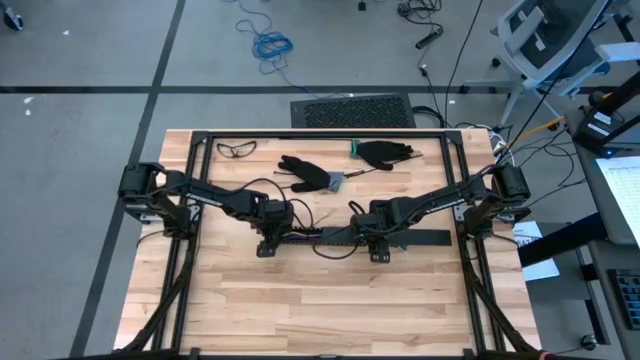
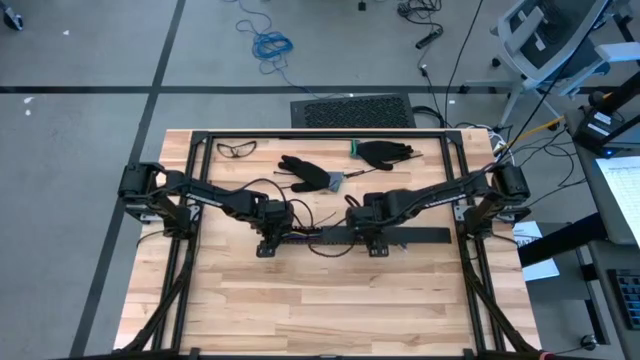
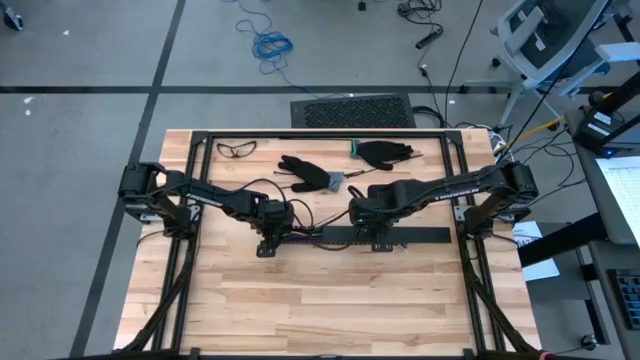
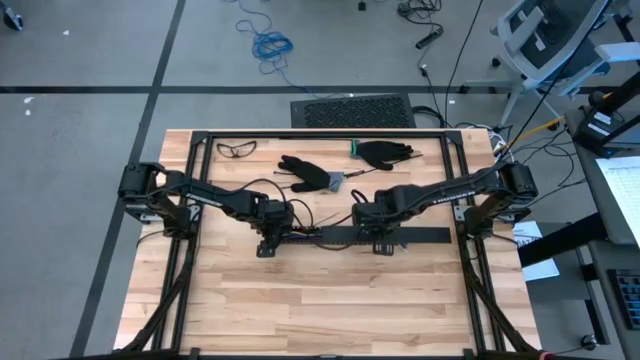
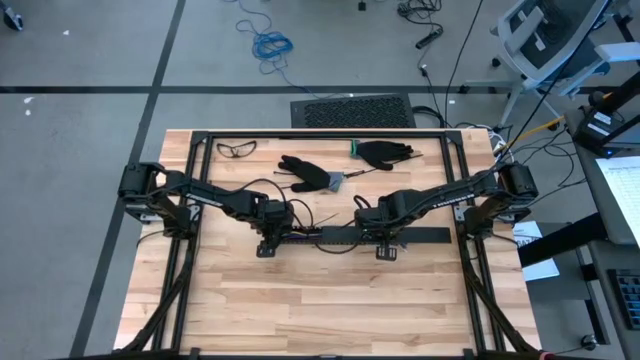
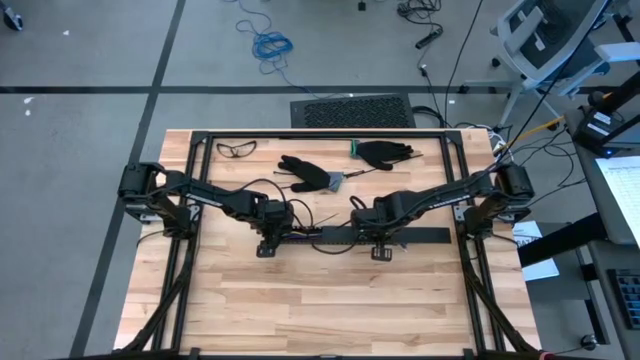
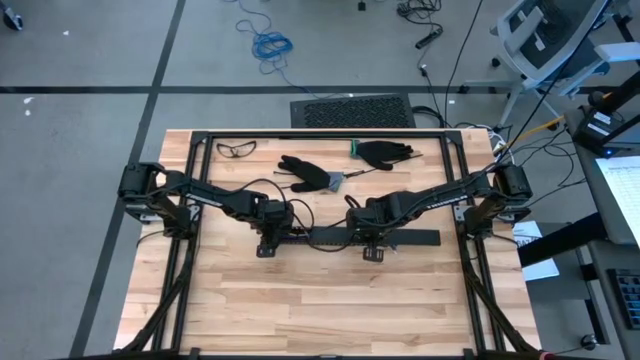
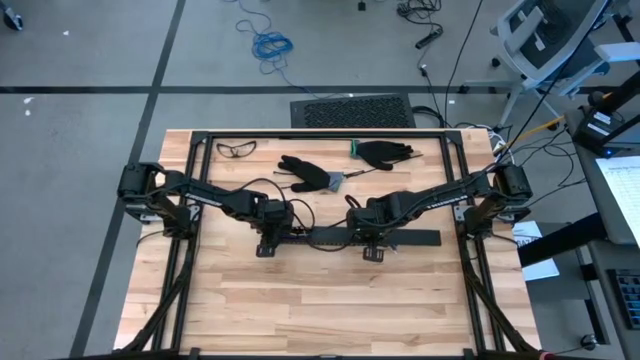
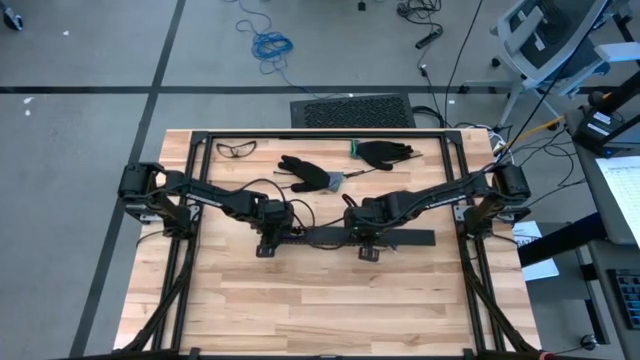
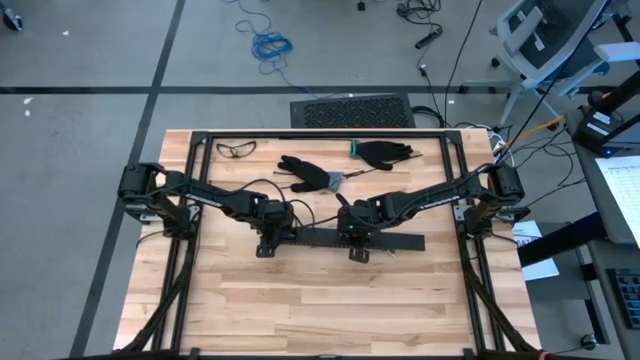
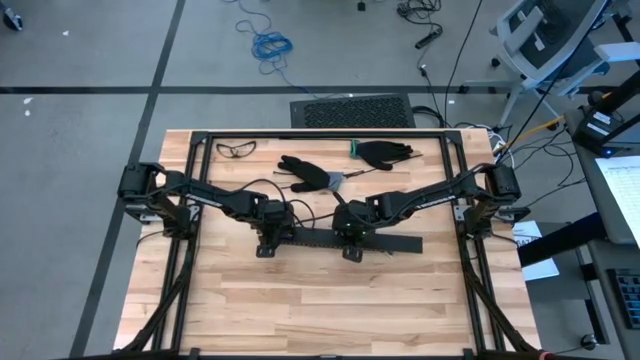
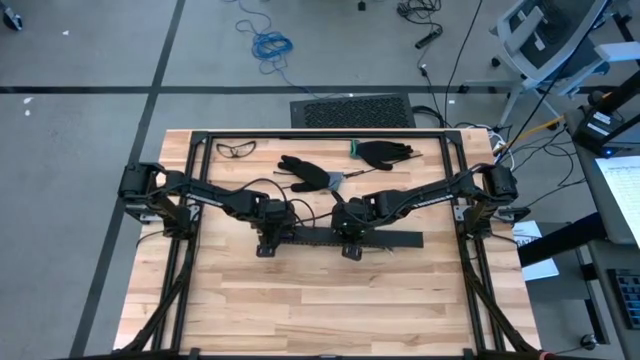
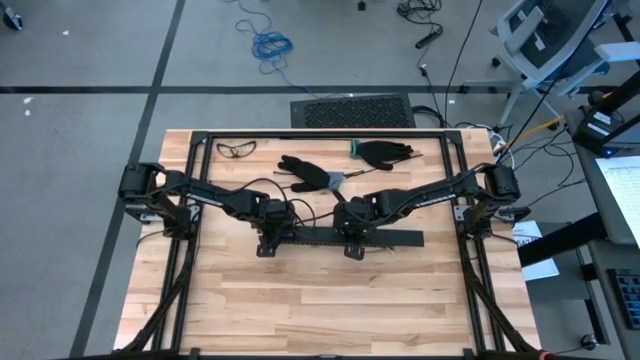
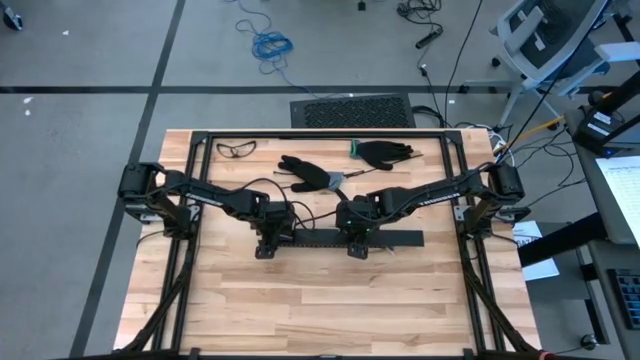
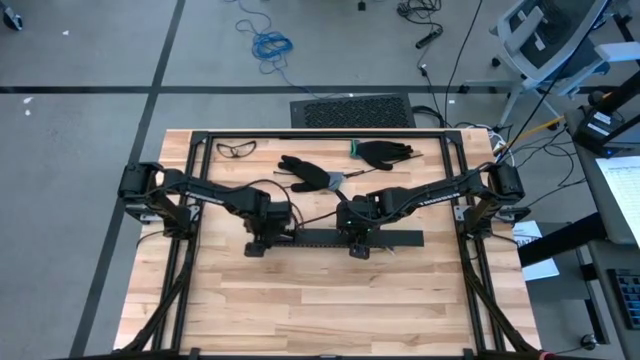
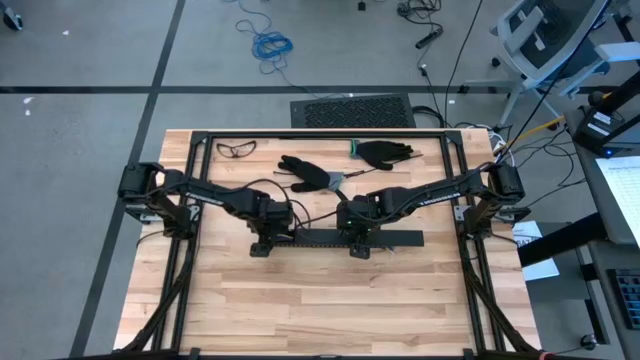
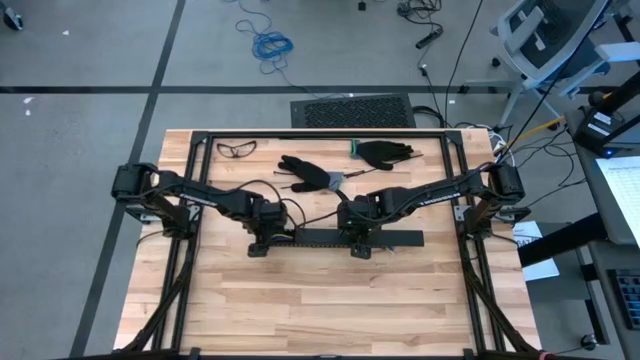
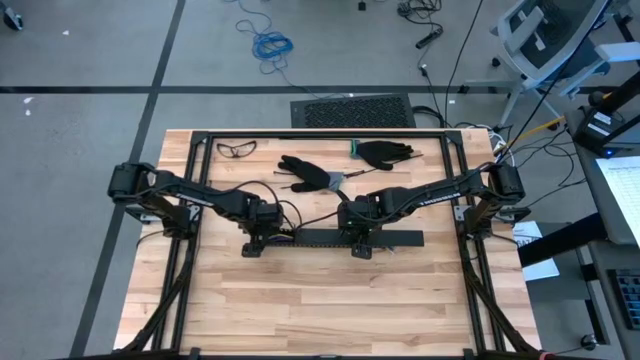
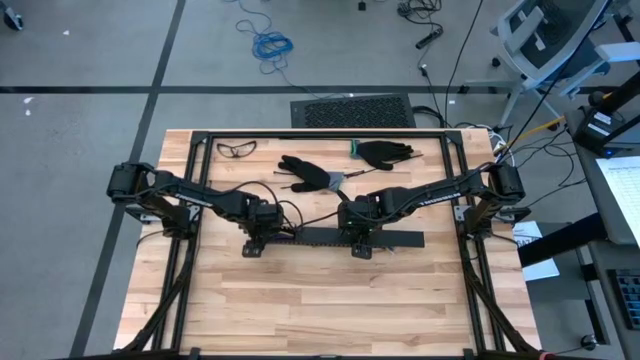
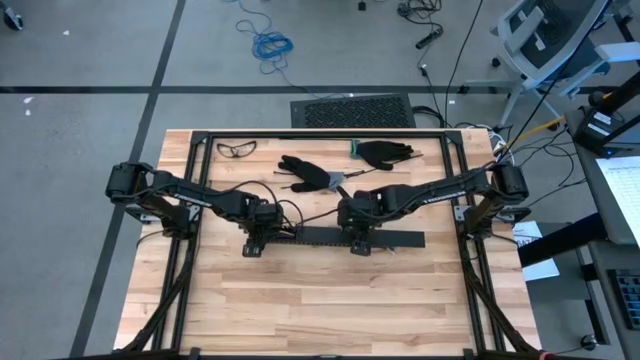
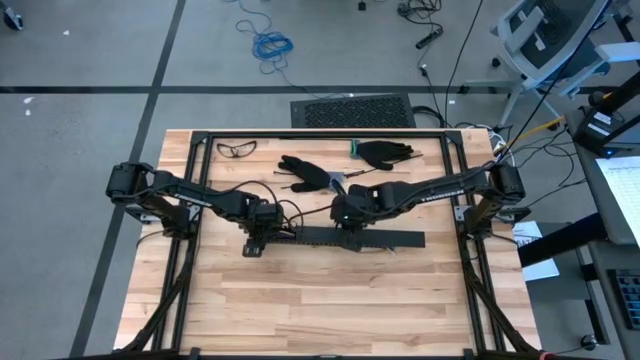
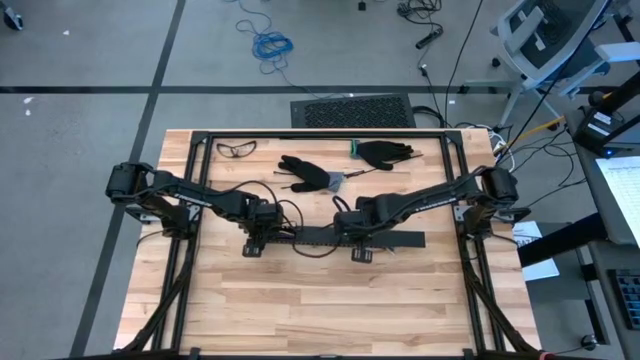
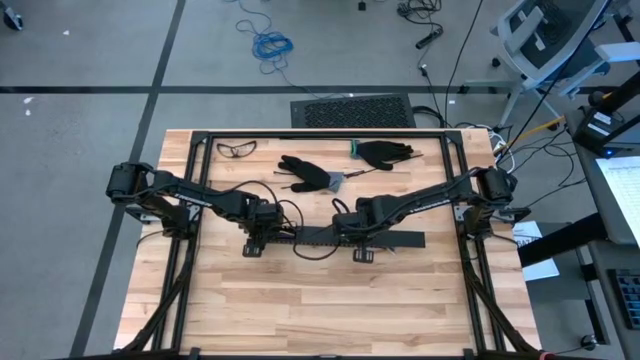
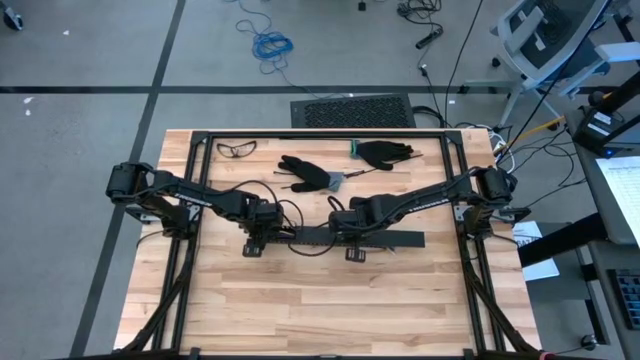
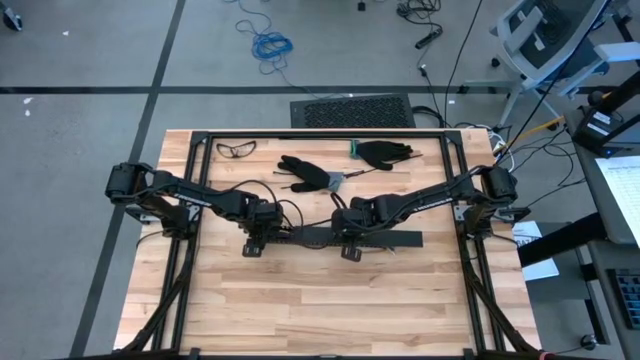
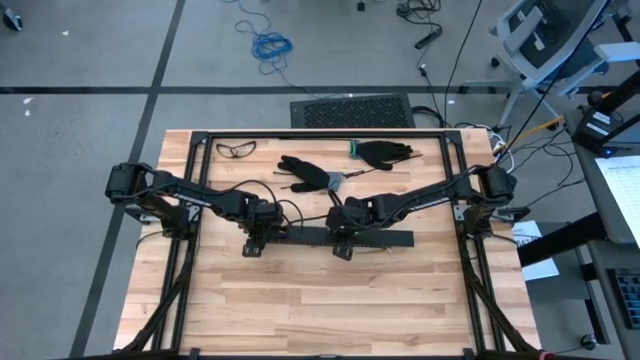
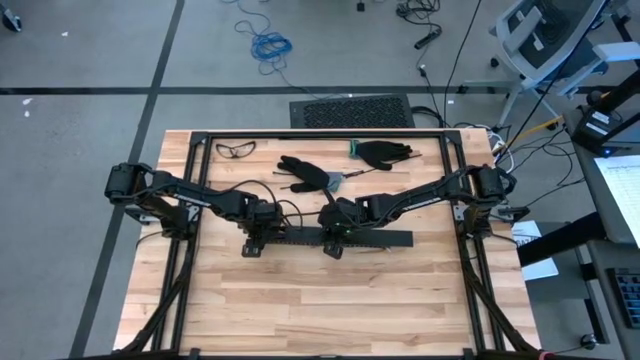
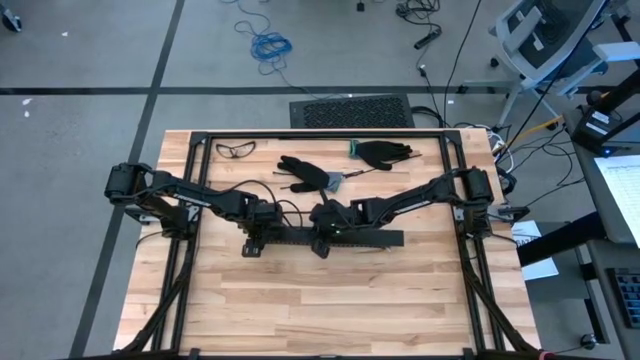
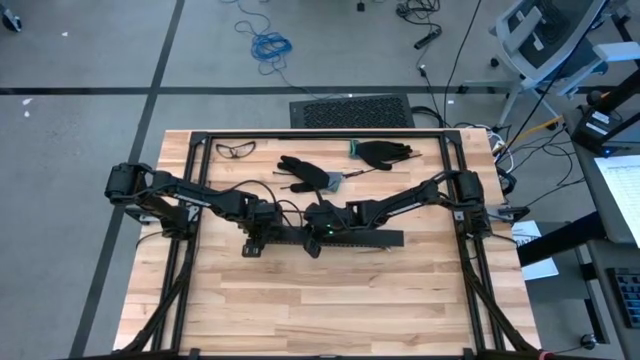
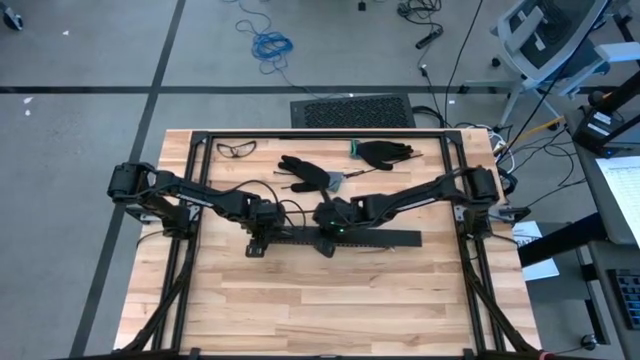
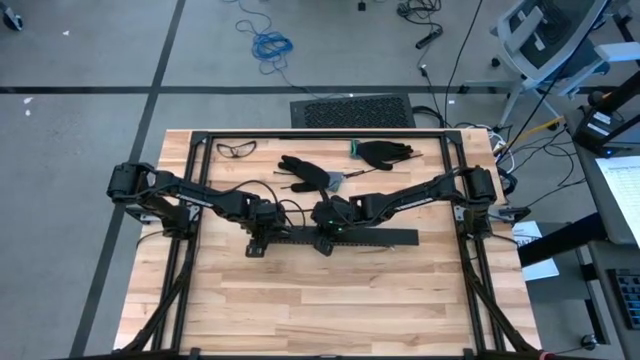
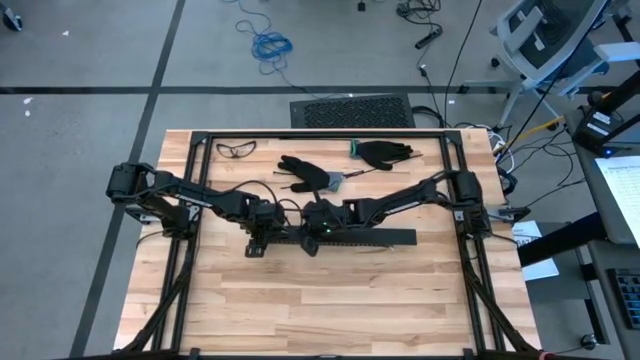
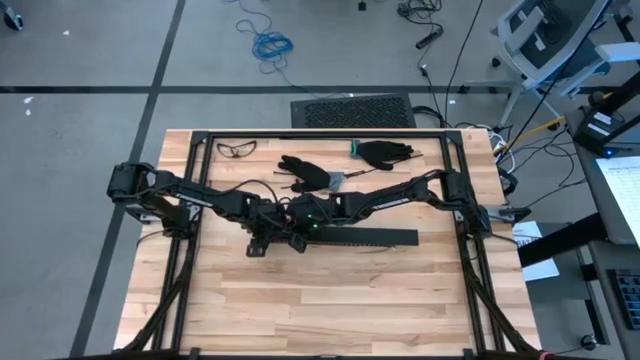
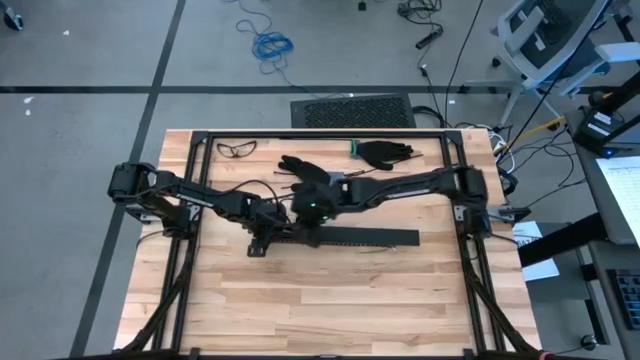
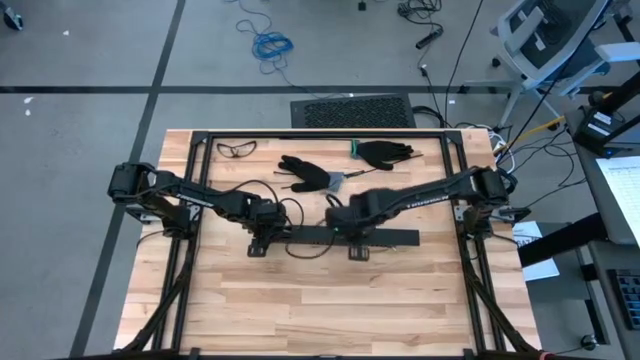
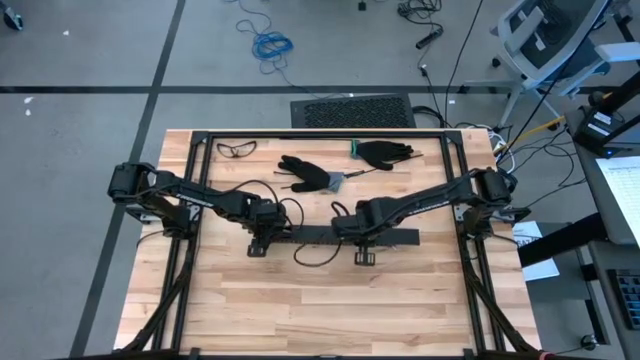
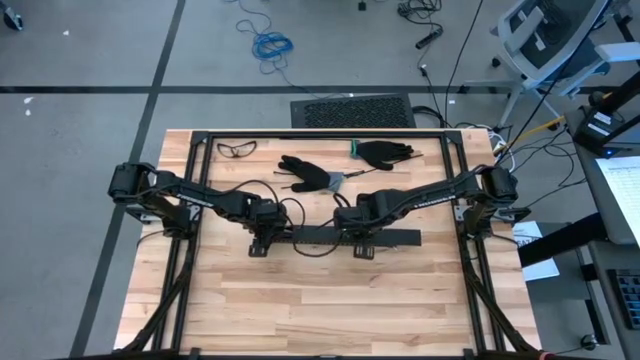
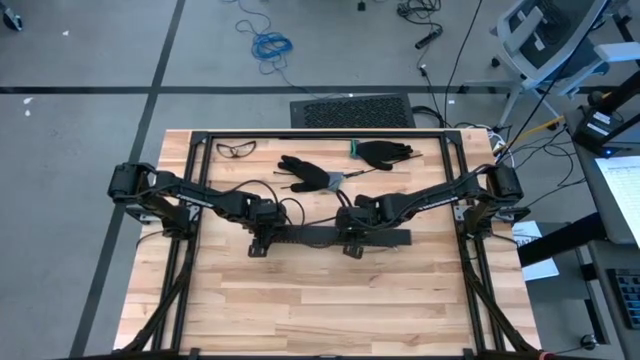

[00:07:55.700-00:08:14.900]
Task: Ziptie cables
Insert the black cover of the black cable duct

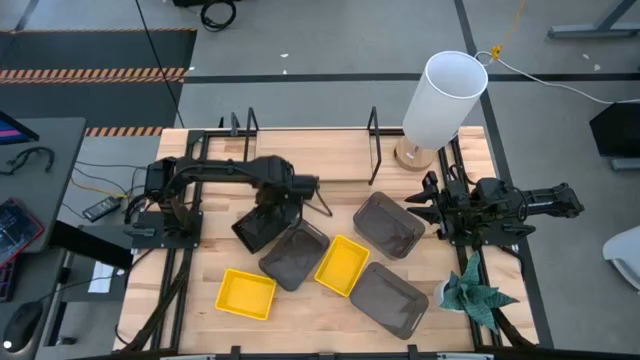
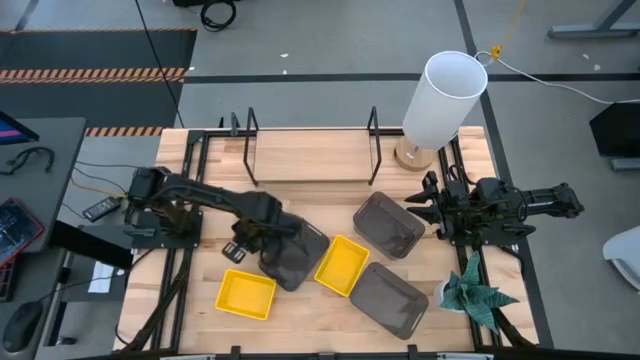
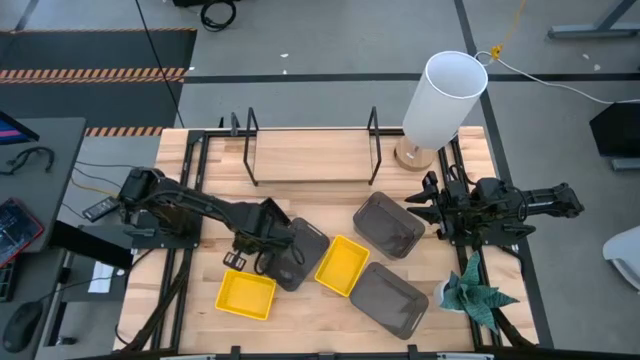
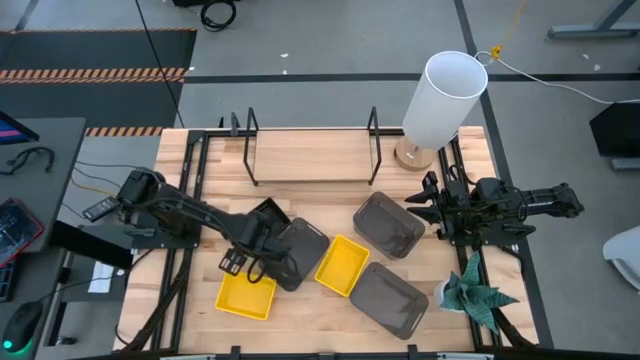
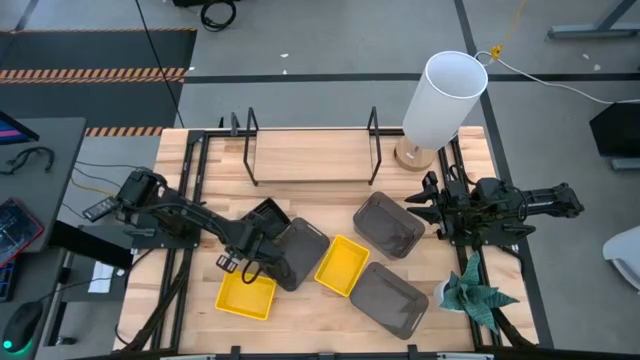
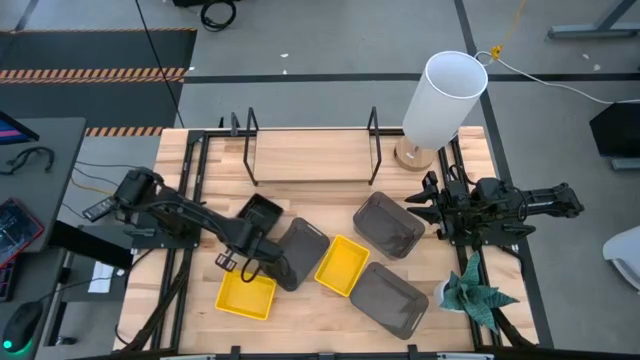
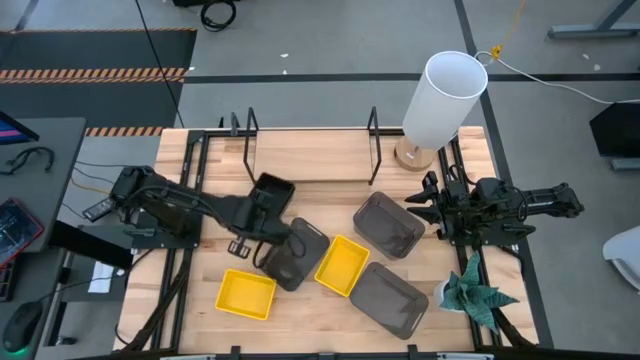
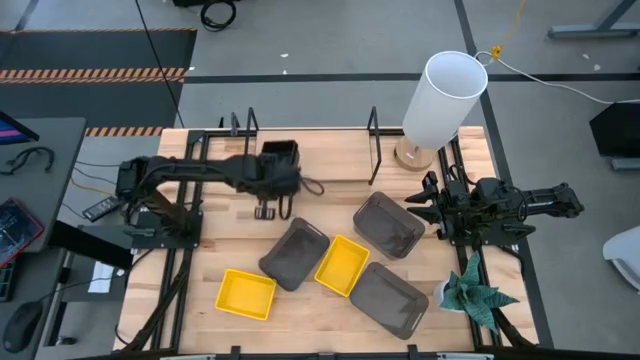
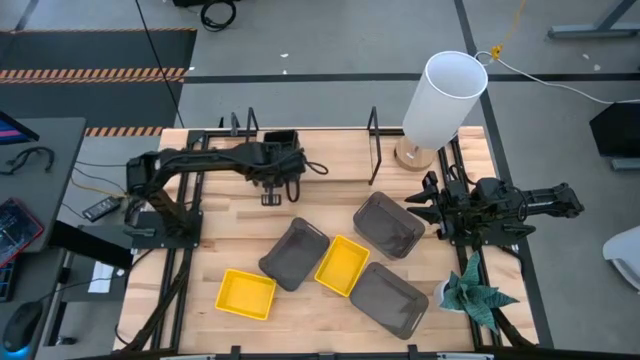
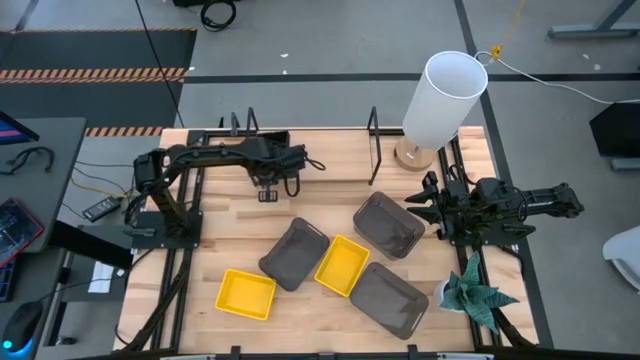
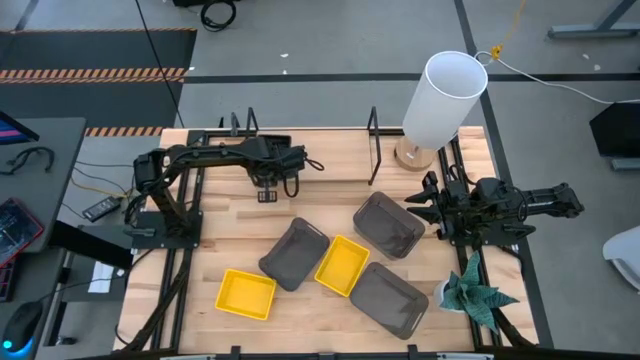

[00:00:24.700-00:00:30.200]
Task: Stack baskets on shelf by color
Put the stack of black bins on the shelf
